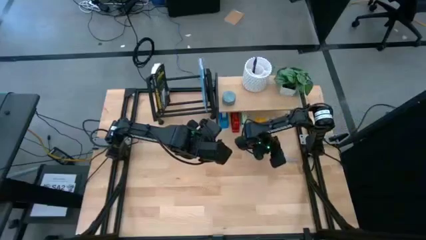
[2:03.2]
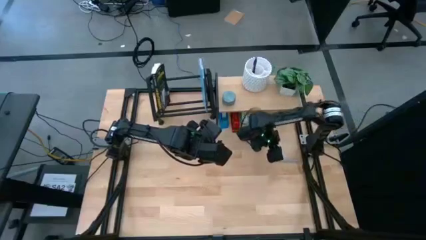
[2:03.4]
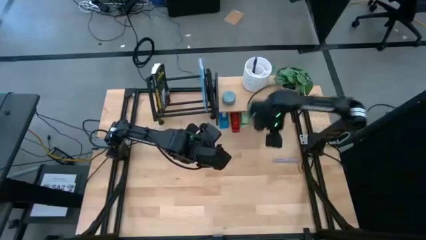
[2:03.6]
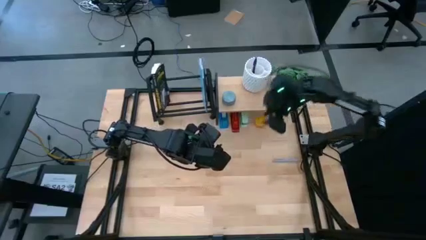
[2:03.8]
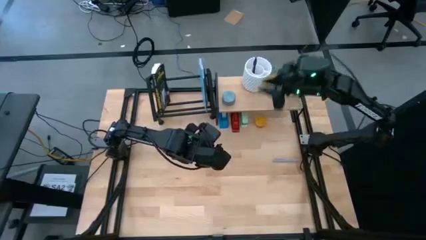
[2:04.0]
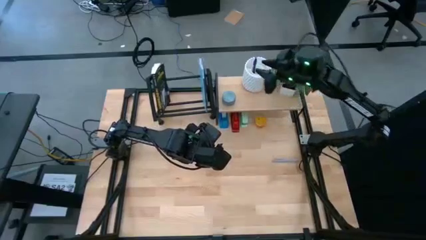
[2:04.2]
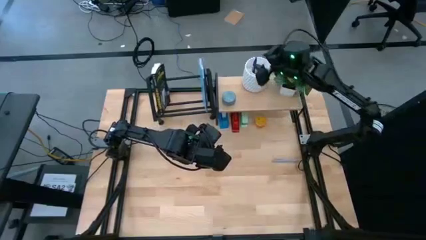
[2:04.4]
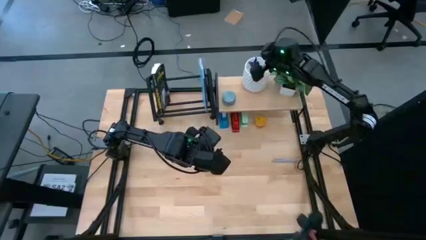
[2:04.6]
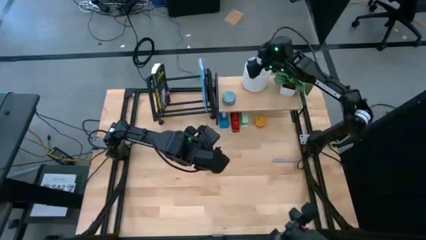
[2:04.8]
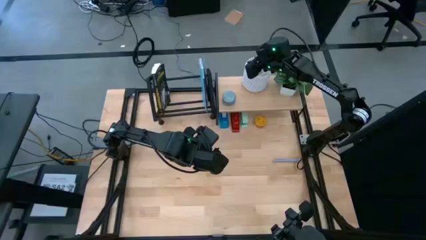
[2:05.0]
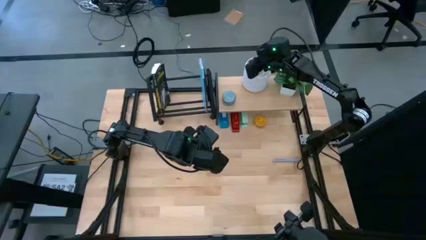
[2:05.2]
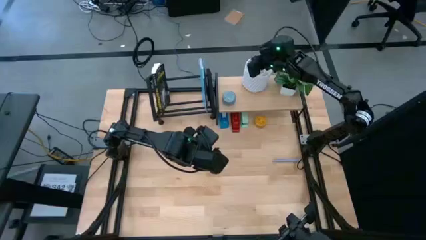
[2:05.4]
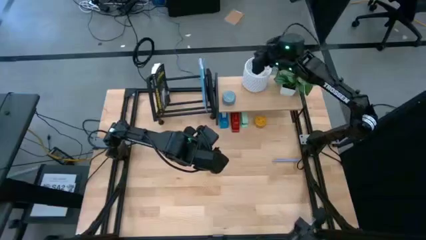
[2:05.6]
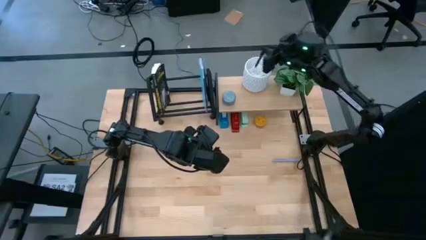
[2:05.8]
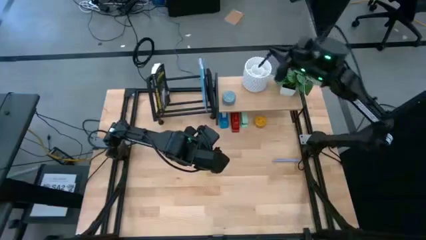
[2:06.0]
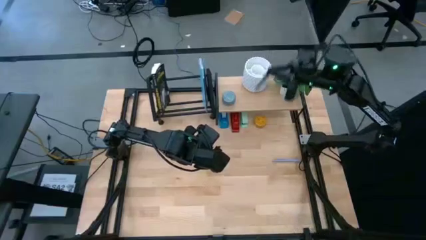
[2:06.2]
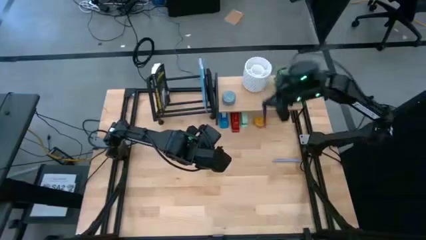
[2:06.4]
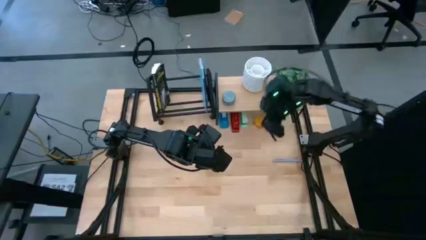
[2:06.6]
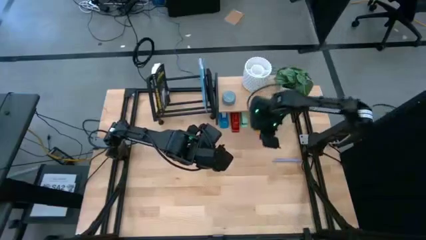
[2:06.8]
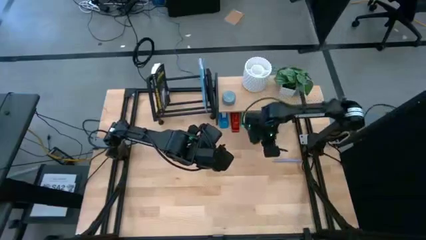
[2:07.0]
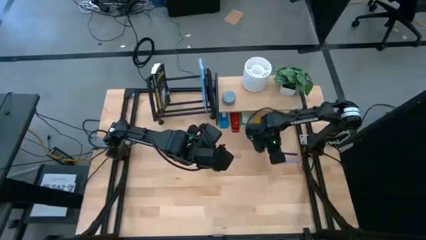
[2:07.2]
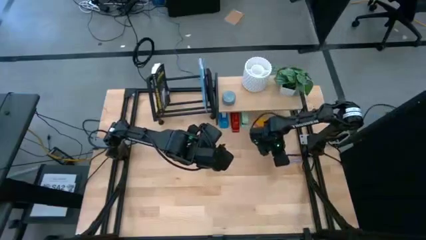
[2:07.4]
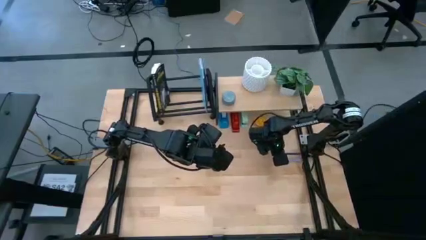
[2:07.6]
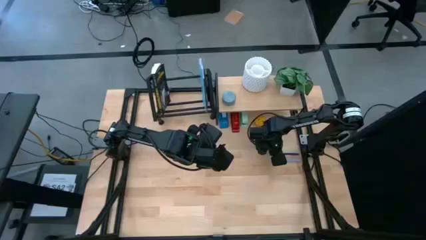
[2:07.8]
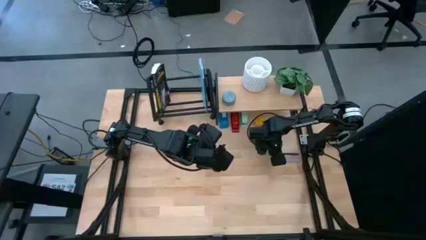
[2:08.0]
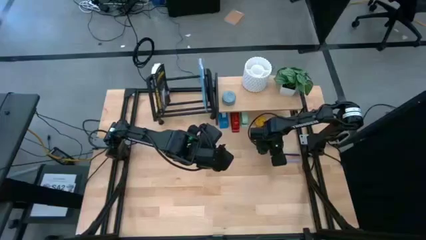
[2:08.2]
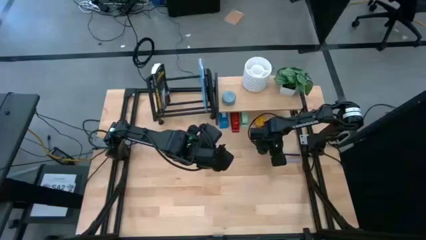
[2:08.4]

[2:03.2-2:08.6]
Task: Stock shelves
Remove the violet pen from the white pen holder on the shelf

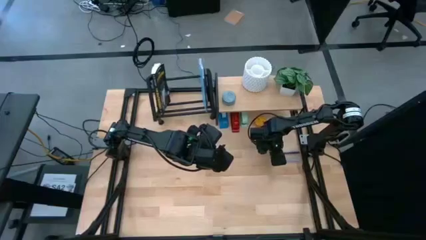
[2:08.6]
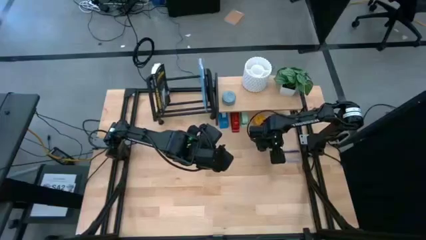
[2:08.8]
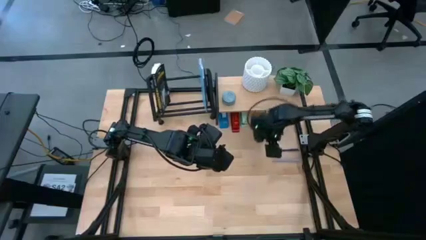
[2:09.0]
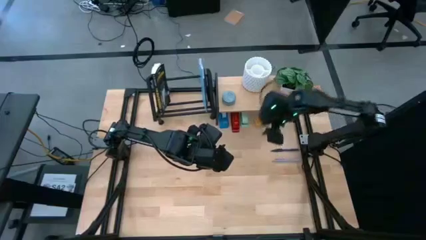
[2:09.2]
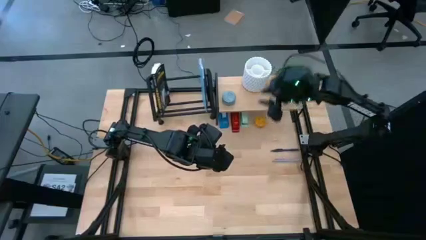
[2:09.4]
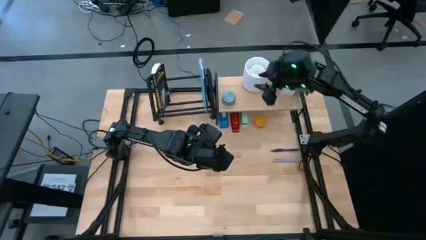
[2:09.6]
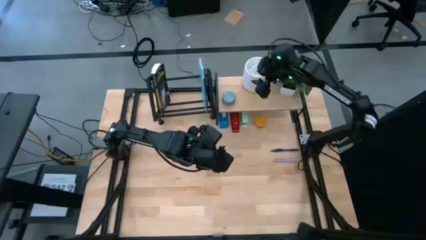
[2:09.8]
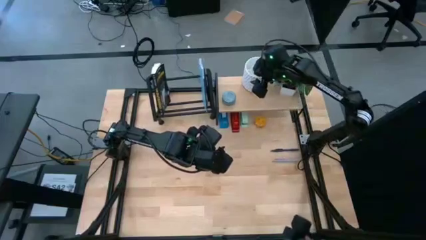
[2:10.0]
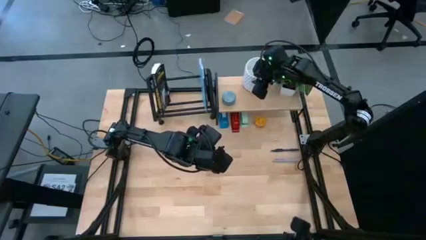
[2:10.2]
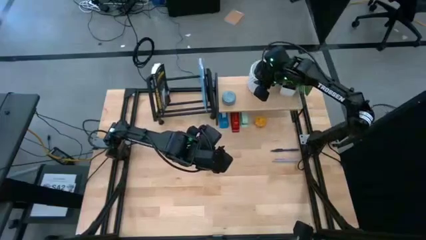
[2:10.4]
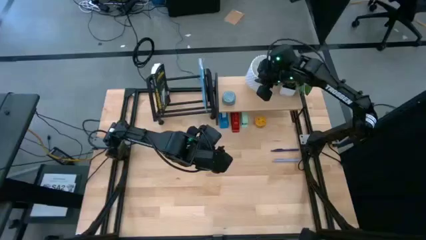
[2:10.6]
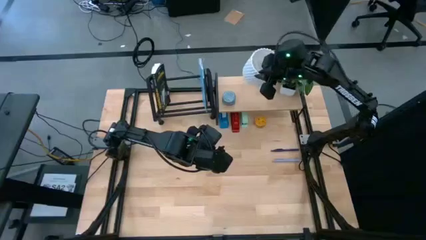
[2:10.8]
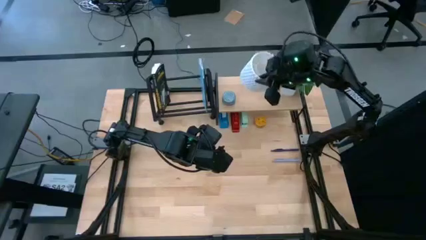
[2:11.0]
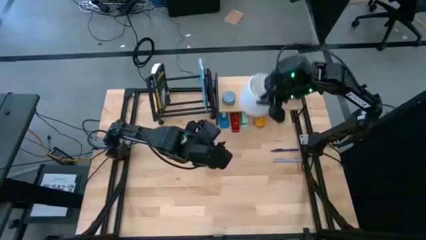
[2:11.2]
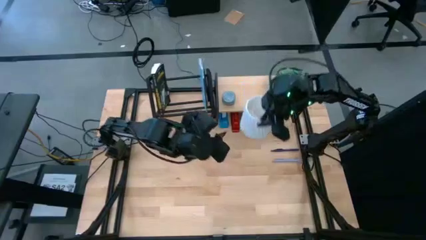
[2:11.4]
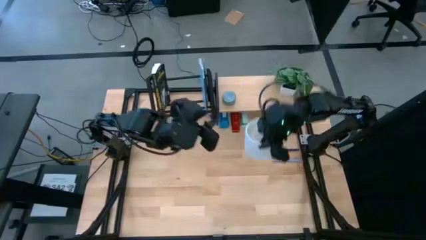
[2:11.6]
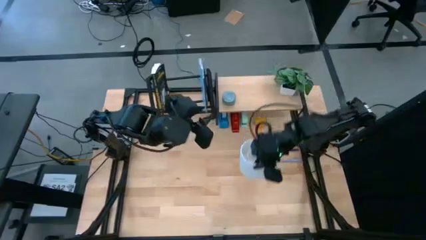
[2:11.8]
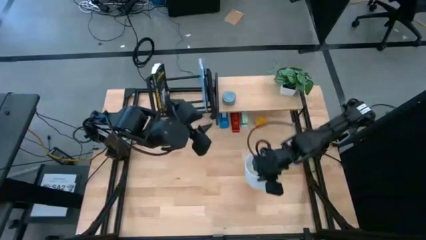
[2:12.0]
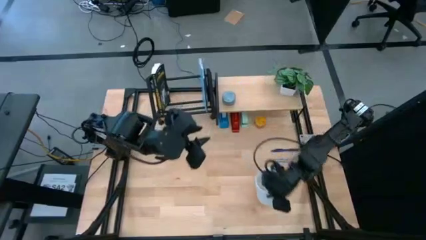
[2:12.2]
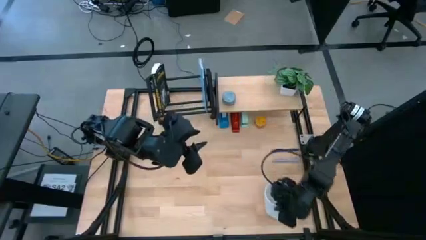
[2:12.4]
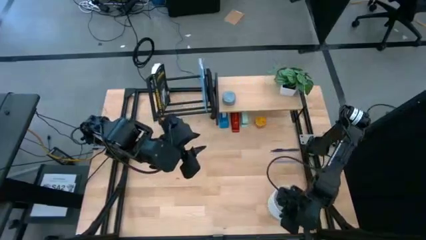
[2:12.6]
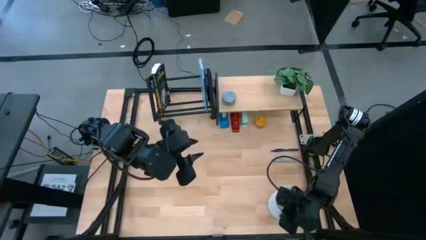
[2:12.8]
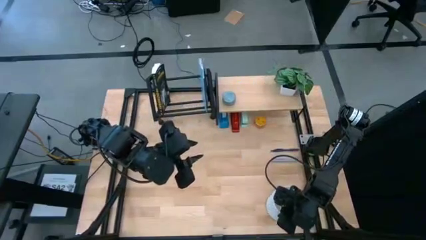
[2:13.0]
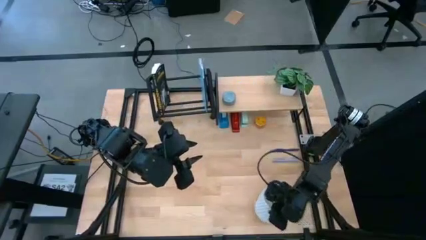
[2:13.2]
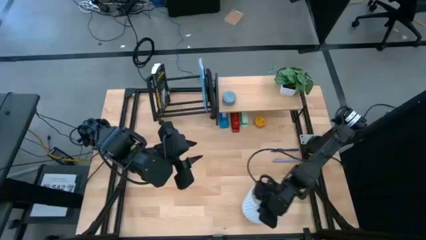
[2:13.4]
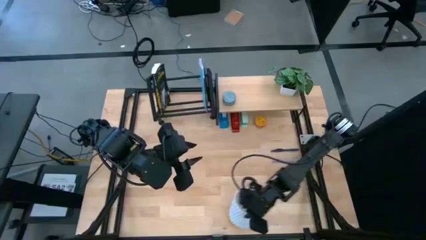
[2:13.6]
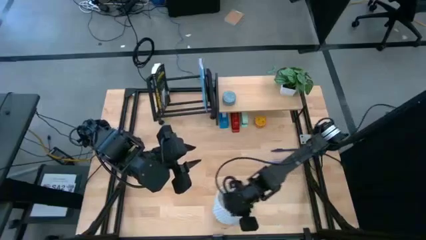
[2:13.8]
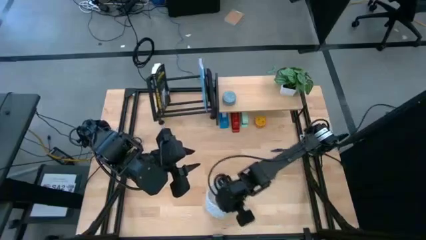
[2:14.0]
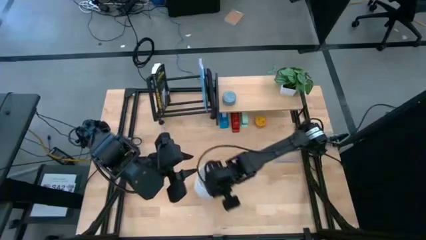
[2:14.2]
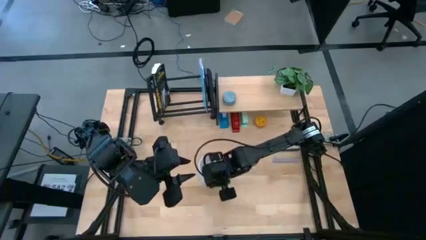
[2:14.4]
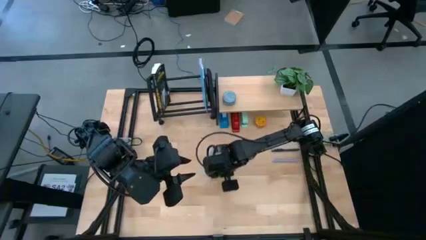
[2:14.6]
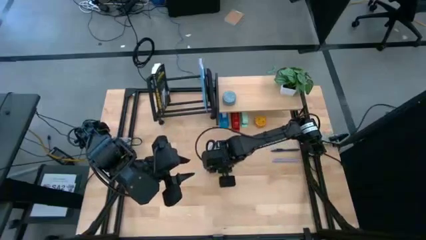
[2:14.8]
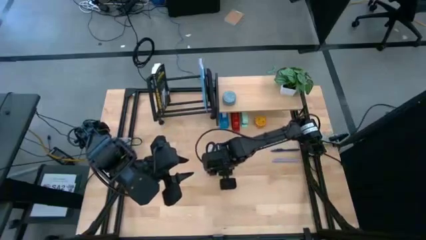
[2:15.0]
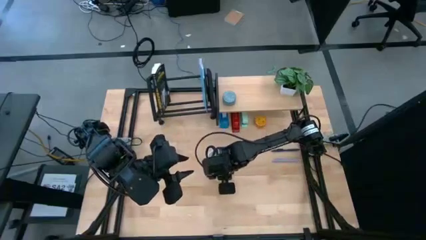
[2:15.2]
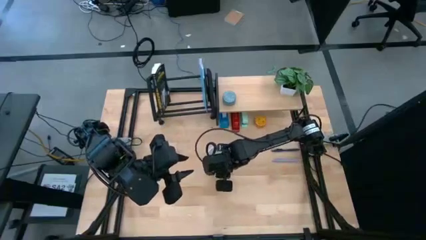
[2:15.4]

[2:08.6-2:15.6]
Remove the white pen holder from the shelf

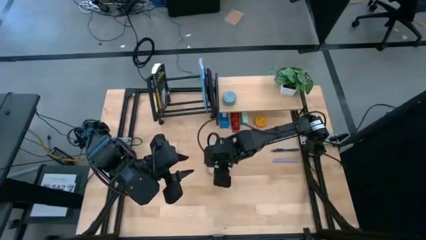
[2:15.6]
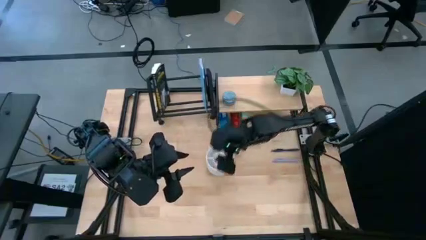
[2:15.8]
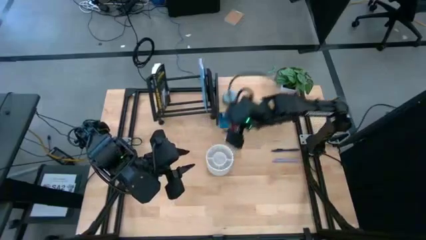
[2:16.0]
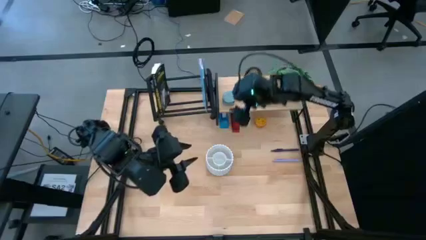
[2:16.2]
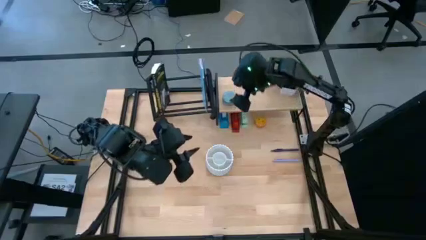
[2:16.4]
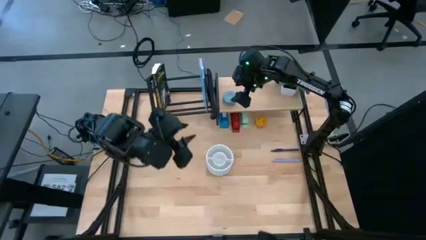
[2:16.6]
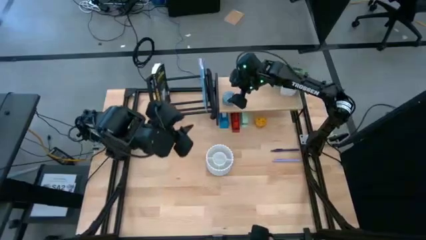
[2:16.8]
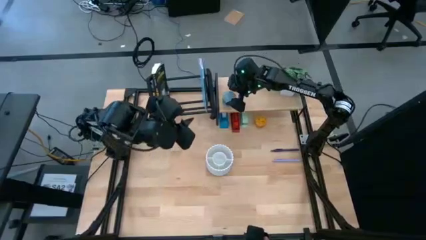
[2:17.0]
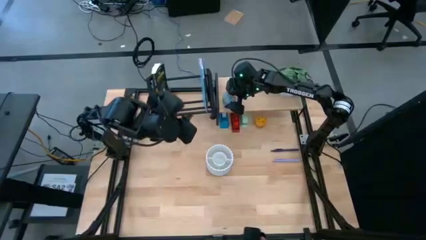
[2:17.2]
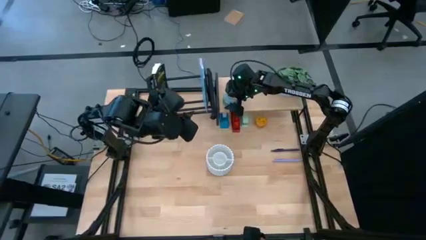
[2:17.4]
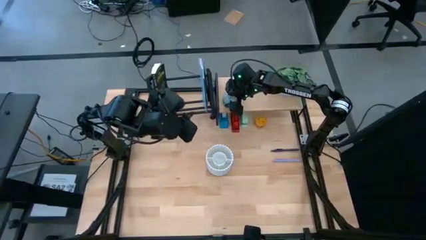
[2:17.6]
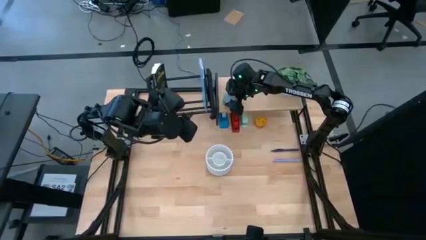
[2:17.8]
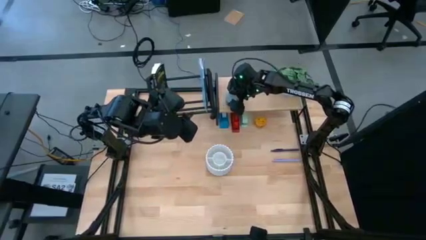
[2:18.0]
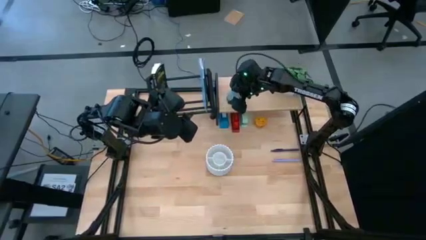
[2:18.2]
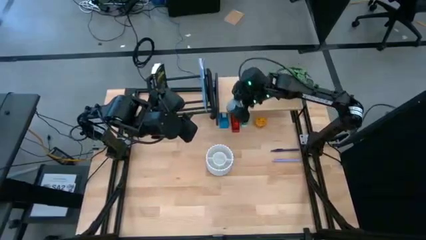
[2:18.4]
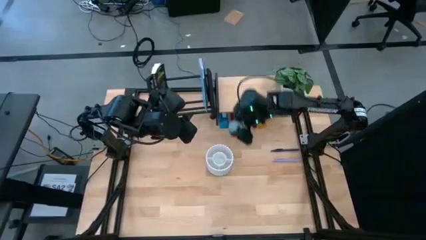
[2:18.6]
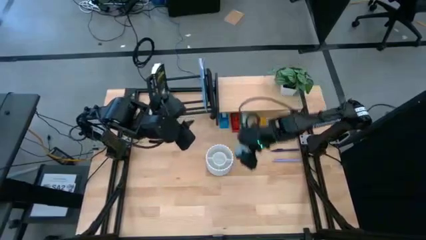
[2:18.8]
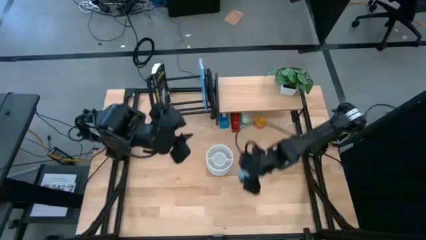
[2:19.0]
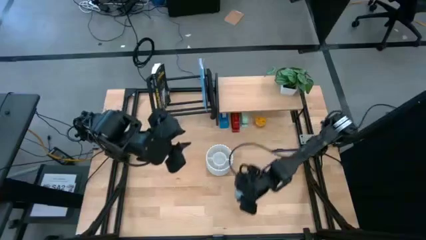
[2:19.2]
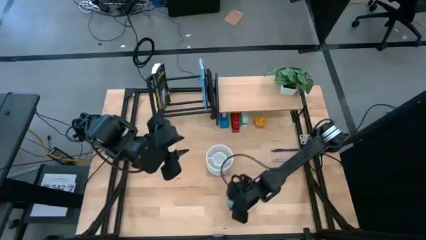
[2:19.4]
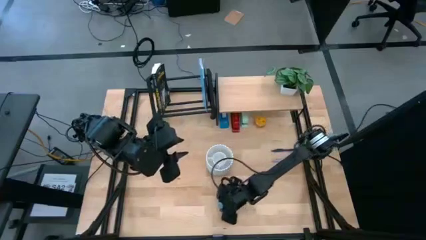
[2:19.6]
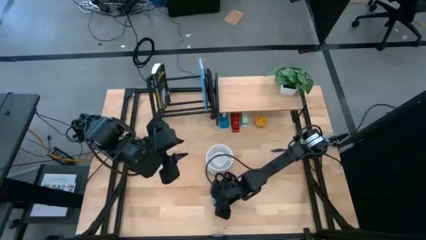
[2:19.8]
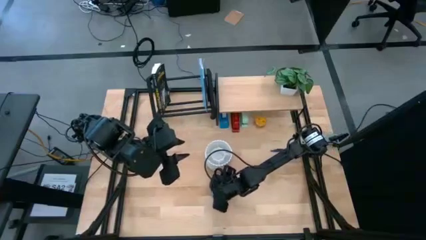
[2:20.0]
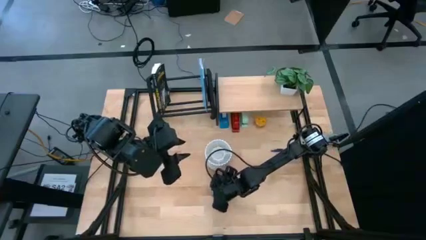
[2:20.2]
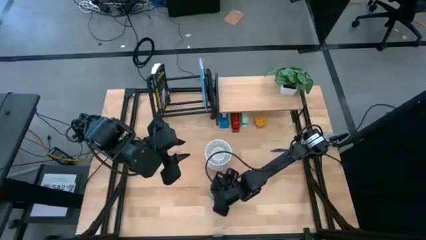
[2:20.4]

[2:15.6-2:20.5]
Remove the blue scented candle from the shelf
